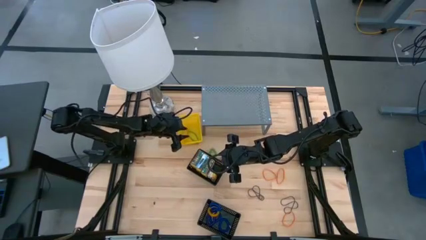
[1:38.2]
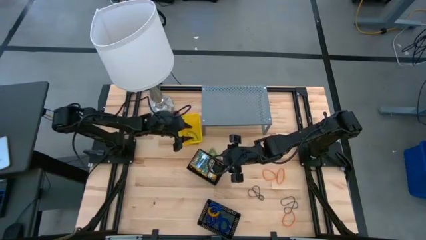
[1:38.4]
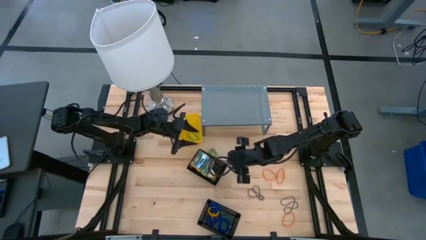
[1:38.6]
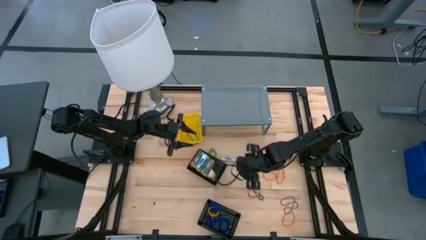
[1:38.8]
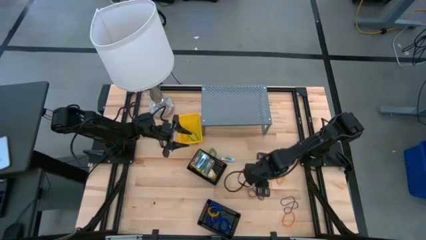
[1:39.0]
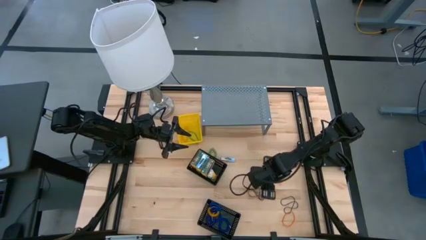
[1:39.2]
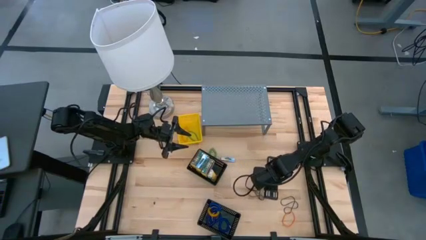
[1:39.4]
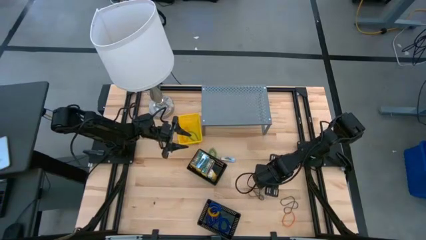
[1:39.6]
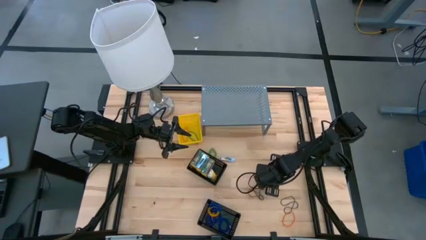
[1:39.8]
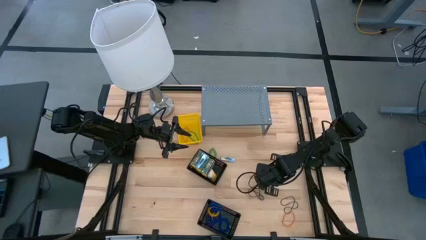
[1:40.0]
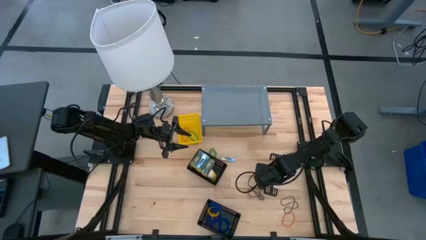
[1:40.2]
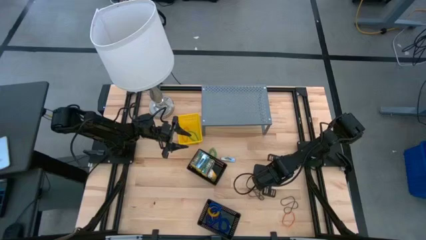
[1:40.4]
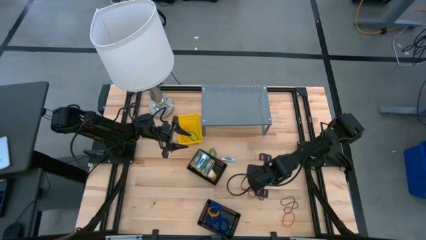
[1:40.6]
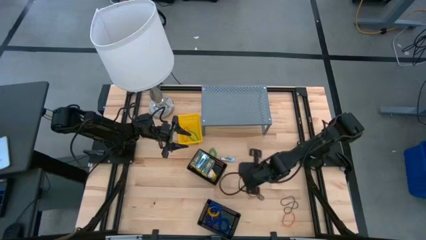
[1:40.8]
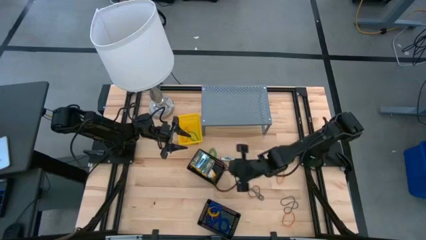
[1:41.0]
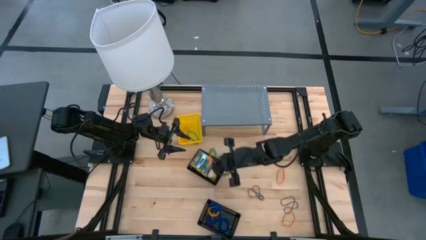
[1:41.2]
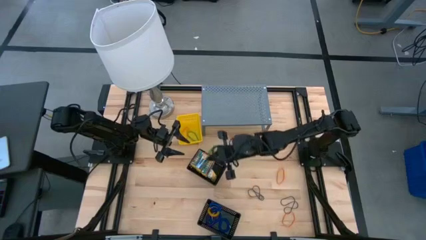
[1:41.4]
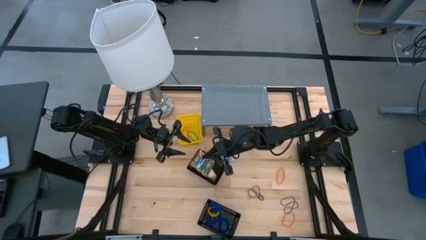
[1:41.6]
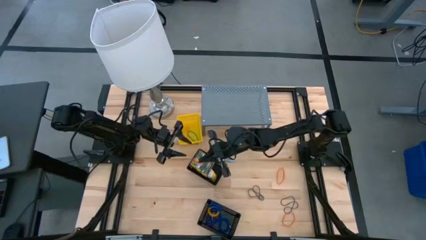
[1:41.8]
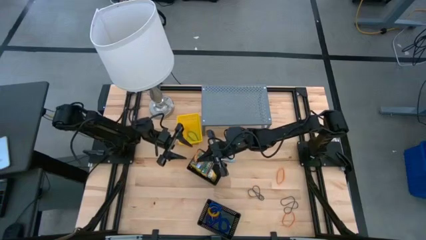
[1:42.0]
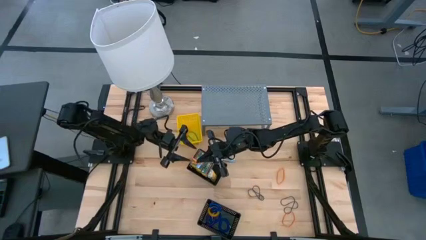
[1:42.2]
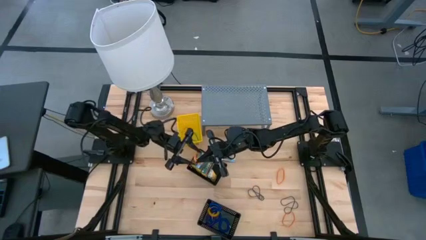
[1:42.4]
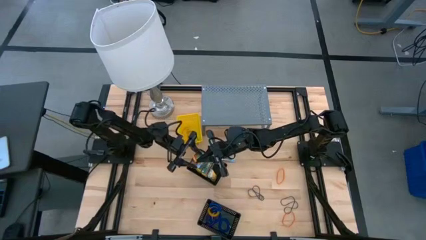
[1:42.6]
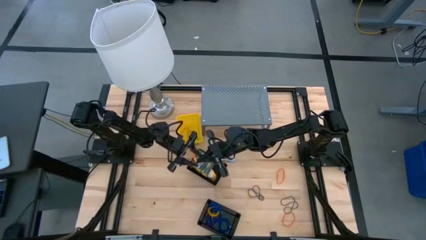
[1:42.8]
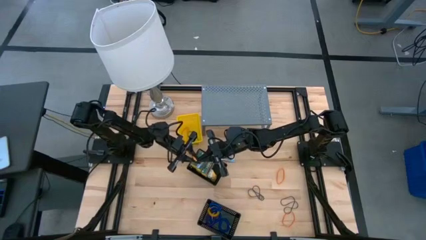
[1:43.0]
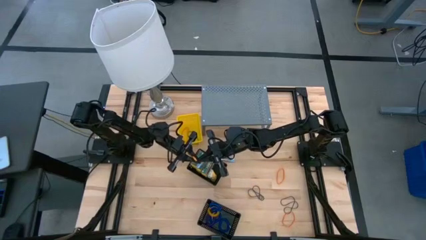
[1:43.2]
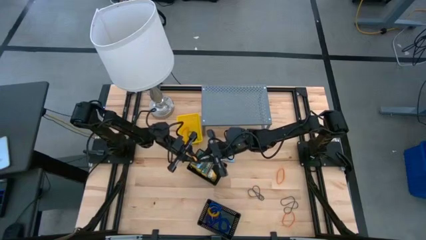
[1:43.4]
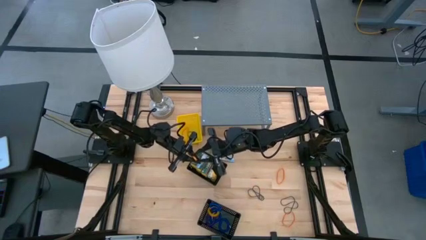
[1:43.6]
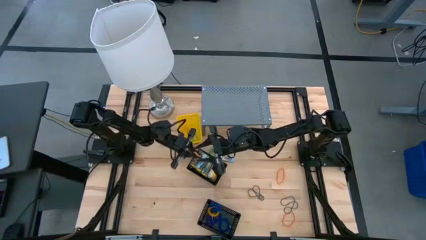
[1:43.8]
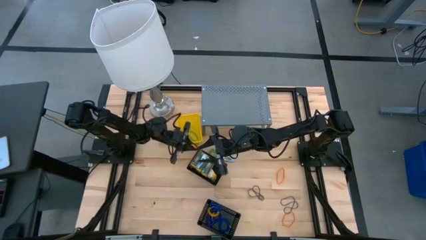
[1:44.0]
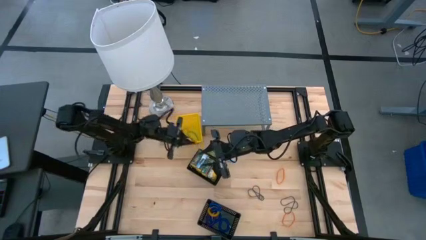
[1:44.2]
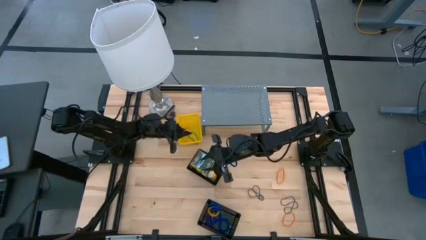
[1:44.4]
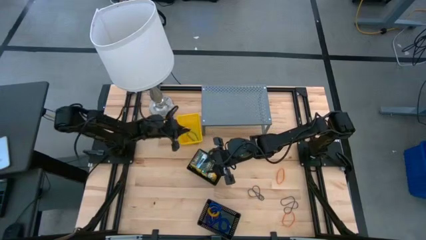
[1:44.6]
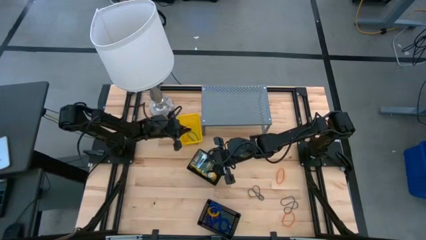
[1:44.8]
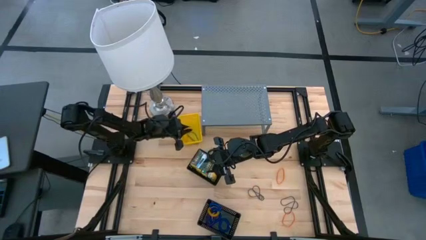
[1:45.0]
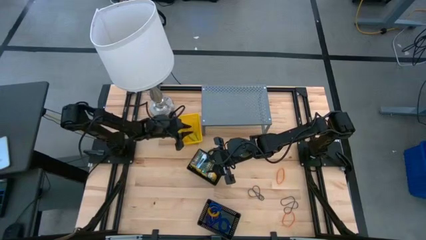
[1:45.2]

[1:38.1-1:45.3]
Task: Pick & Place Office Desk Supplies
Put the top left orange rubber band into the yellow bin

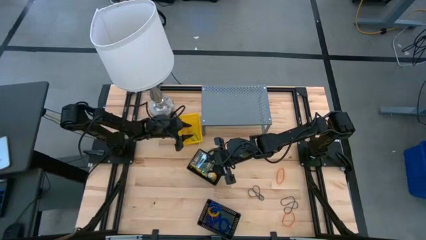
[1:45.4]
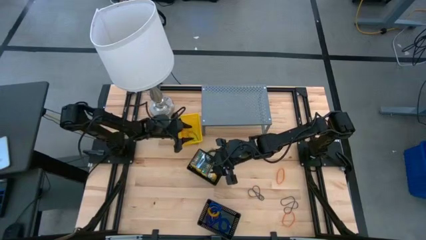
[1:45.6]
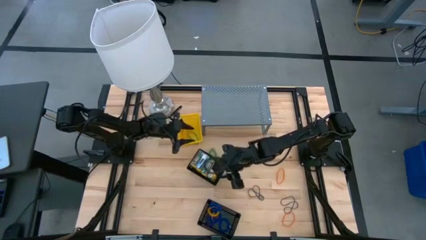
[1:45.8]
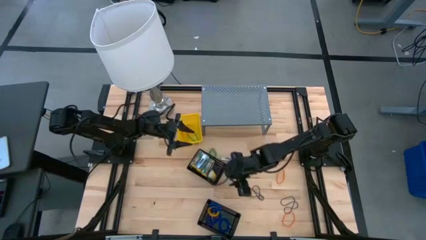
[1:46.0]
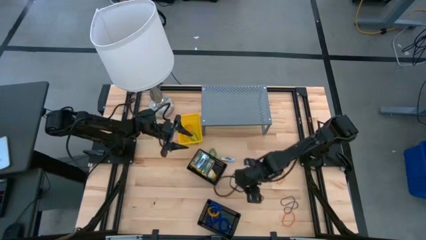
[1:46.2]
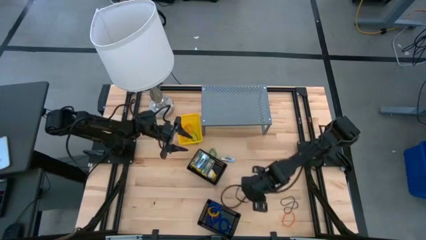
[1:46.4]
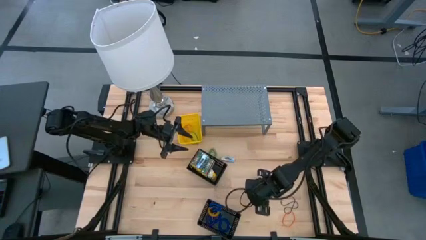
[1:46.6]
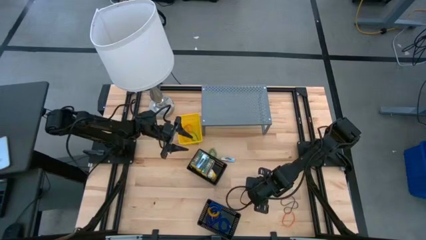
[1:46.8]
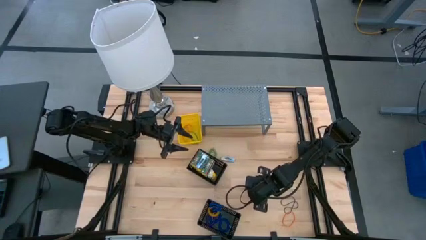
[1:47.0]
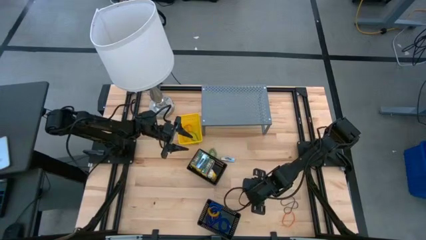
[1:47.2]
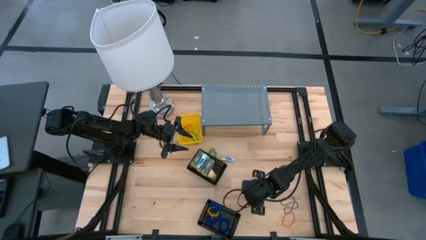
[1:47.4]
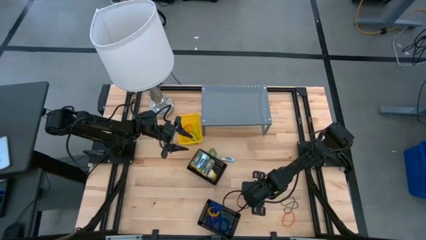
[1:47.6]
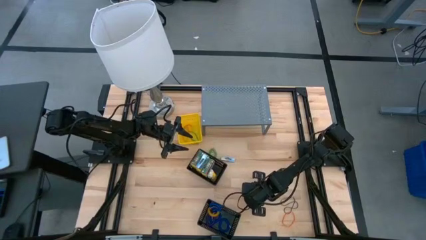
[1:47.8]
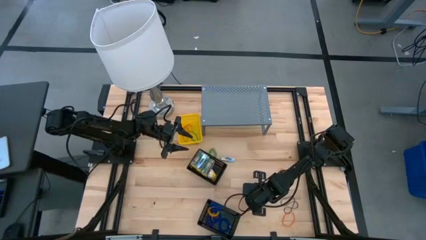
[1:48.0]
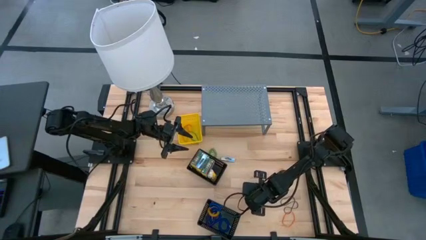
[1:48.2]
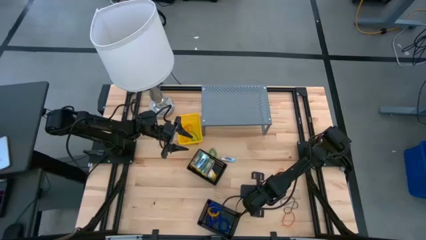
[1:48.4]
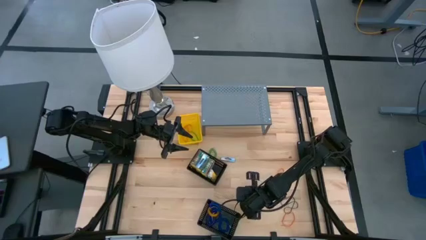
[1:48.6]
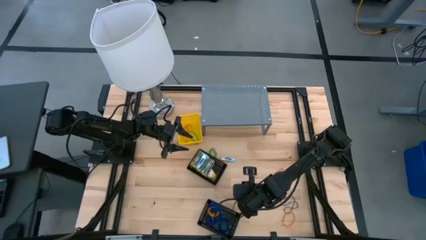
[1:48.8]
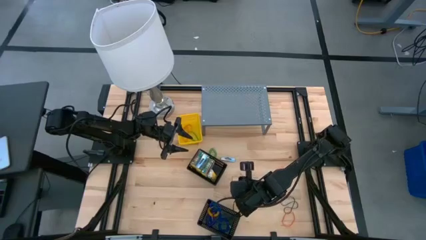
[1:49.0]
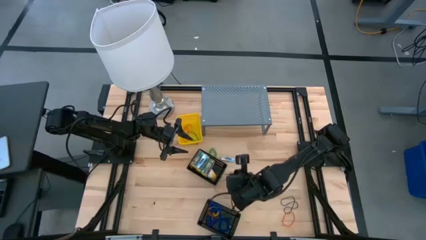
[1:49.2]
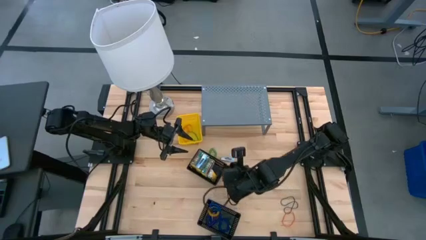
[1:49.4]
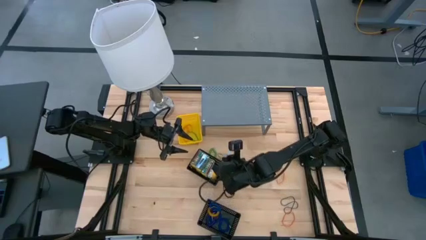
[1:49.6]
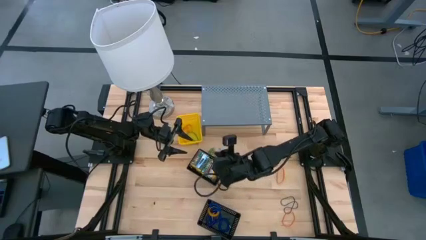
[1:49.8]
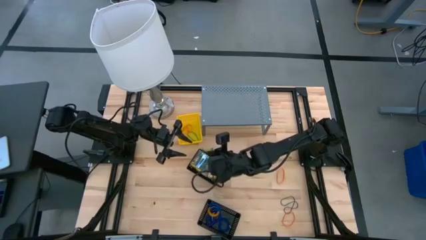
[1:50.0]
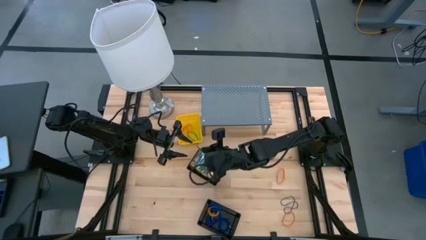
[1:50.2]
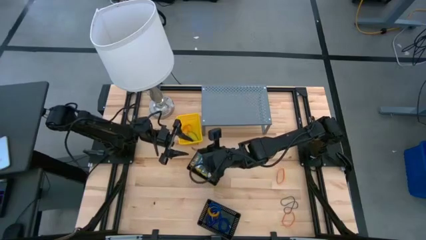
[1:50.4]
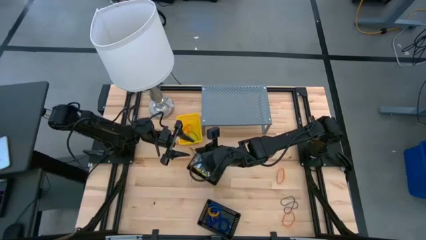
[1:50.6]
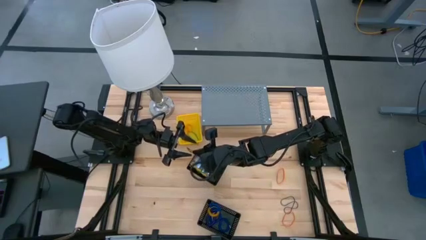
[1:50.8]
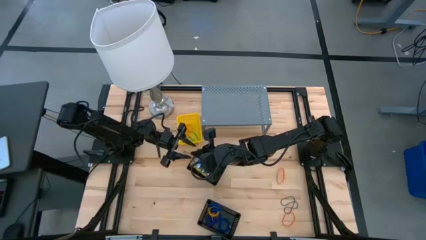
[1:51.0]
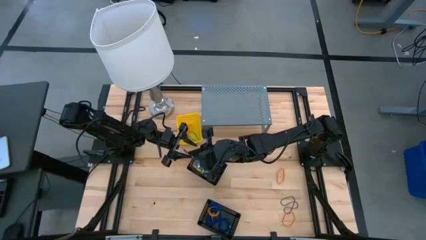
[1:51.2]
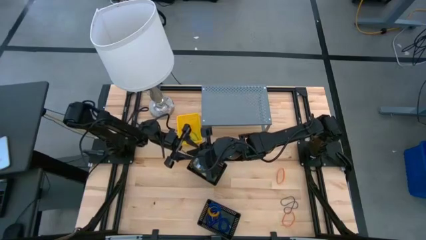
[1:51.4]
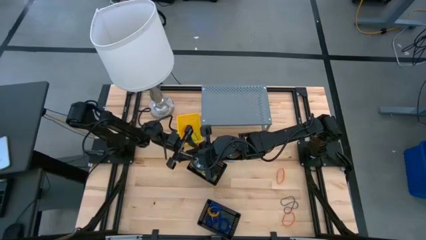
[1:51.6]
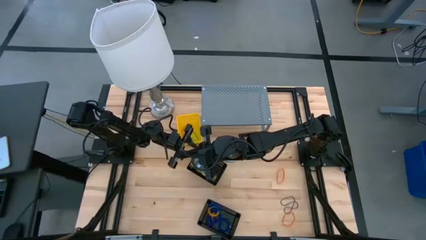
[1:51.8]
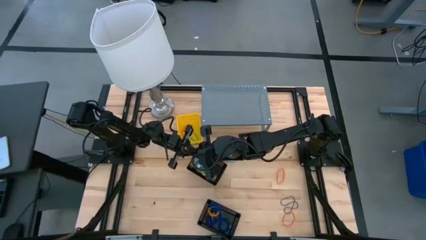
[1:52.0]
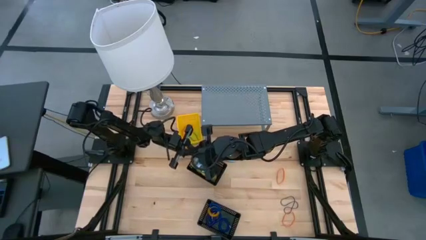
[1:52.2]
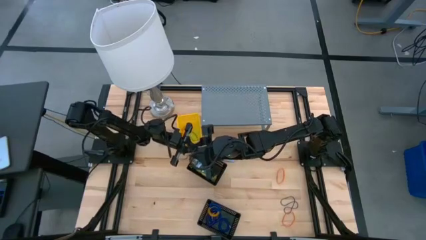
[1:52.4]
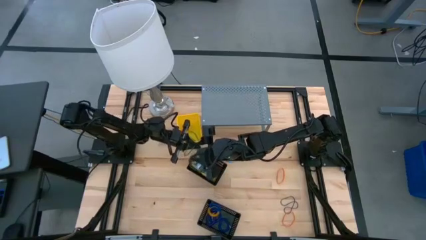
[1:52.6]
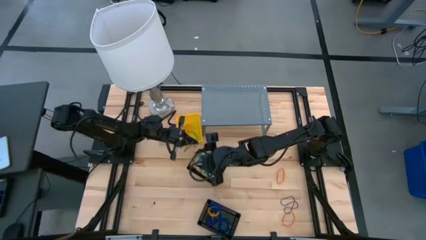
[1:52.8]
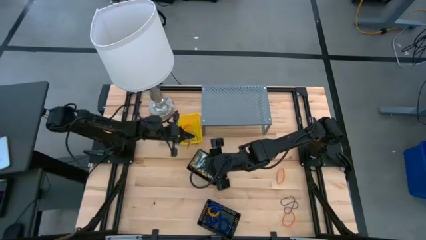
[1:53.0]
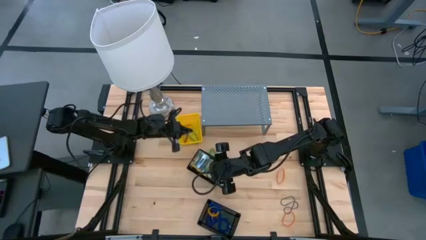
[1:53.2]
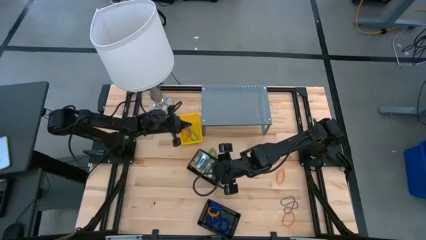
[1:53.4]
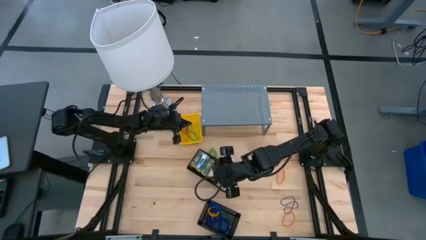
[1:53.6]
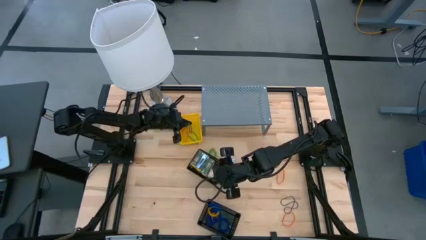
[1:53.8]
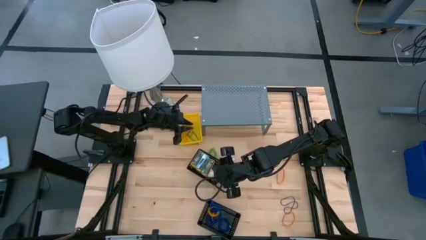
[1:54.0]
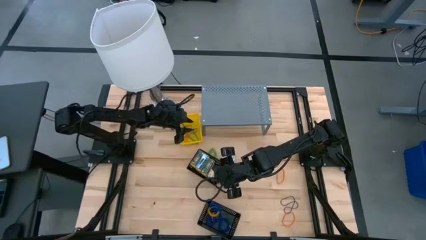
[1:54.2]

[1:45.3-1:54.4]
Put the left black rubber band into the yellow bin

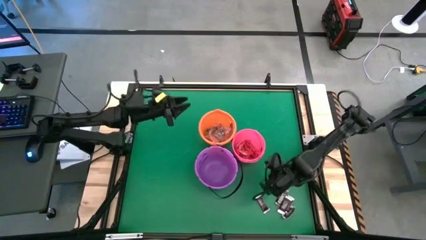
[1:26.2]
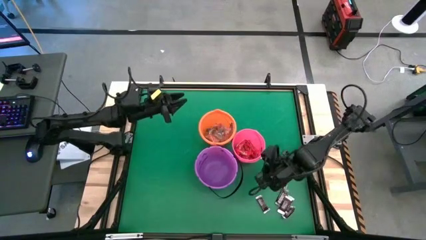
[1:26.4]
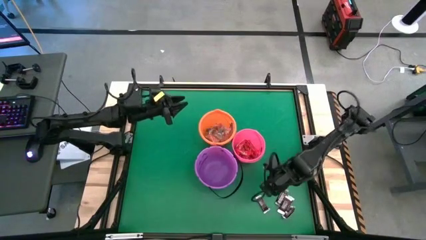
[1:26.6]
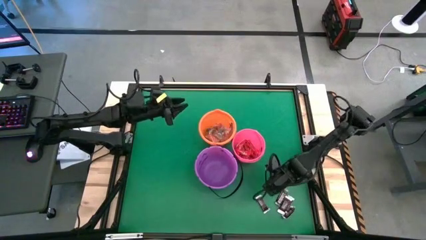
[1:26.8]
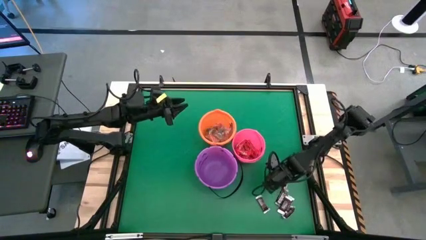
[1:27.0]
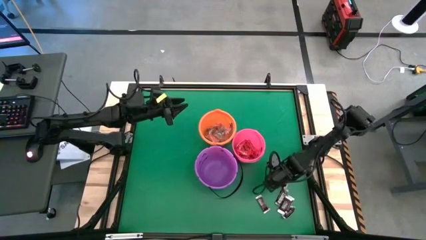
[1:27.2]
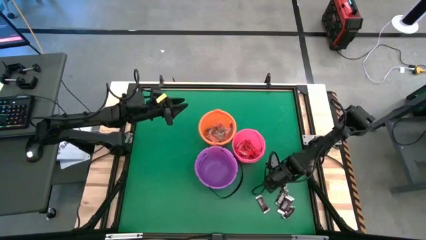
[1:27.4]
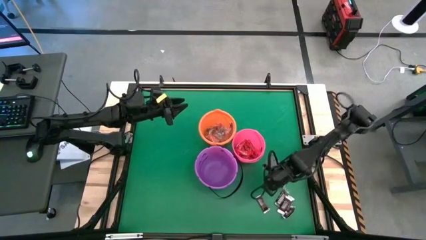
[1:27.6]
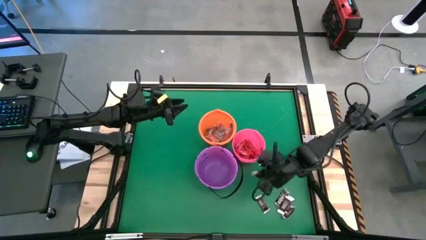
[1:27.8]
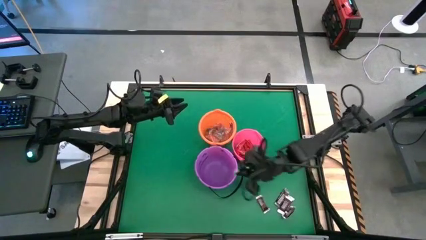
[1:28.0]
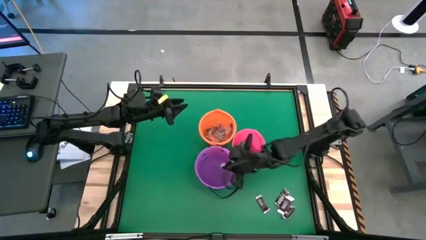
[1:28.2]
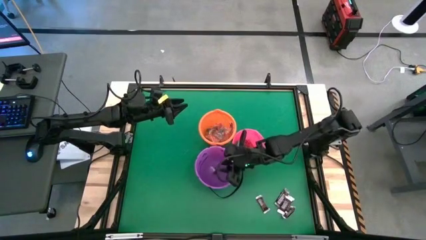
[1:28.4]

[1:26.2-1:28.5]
Task: Sort candy by brand, put in halloween buckets
Put the brown chocolate bar into the purple bucket
